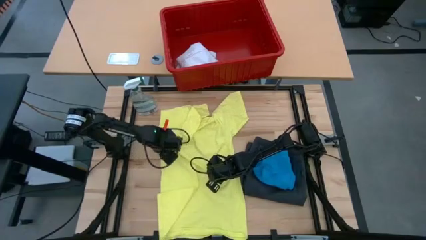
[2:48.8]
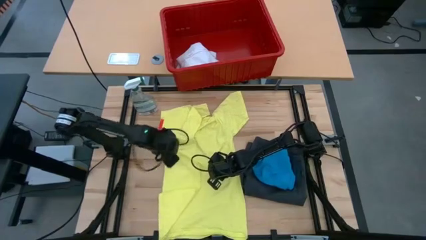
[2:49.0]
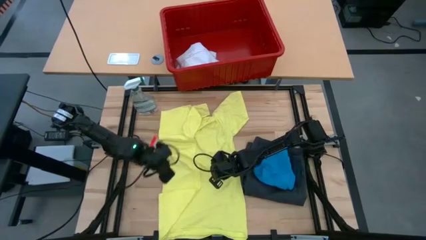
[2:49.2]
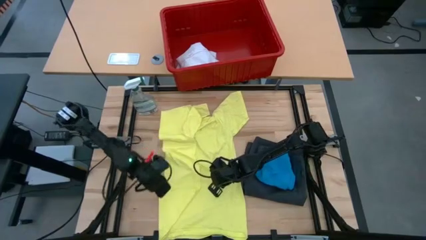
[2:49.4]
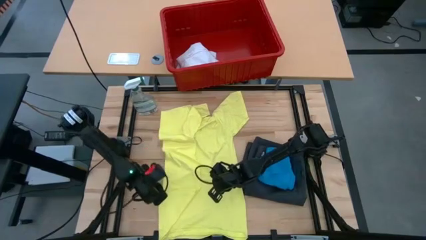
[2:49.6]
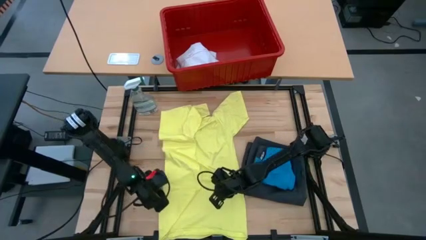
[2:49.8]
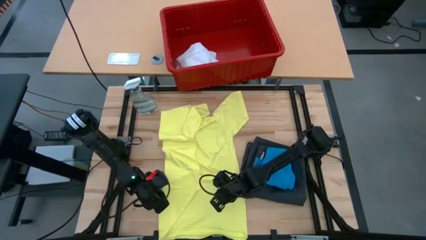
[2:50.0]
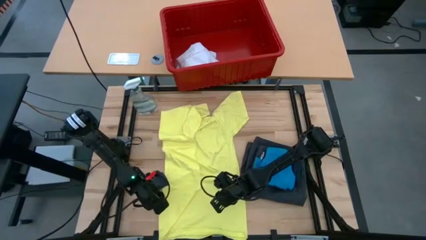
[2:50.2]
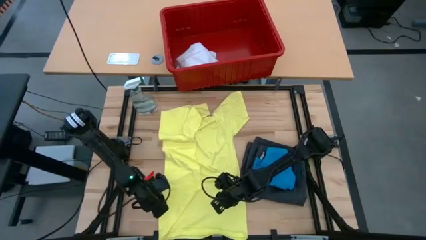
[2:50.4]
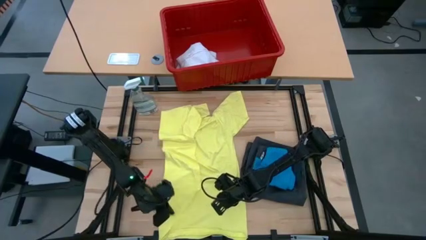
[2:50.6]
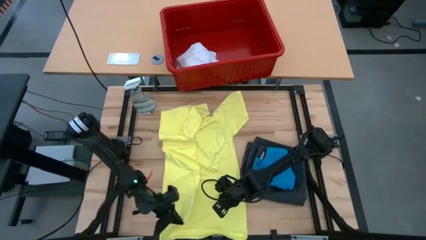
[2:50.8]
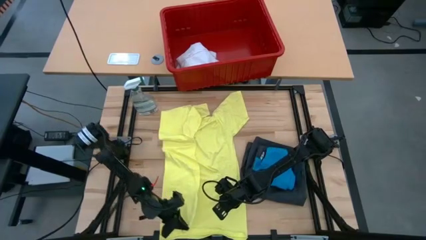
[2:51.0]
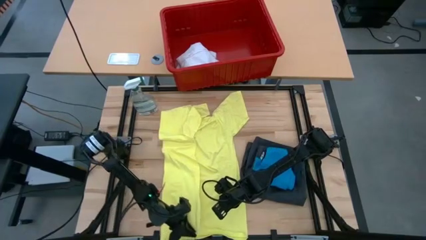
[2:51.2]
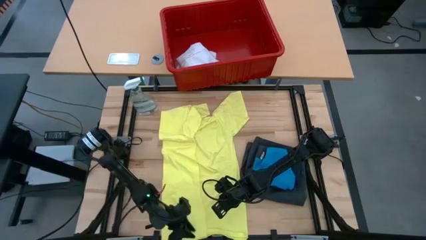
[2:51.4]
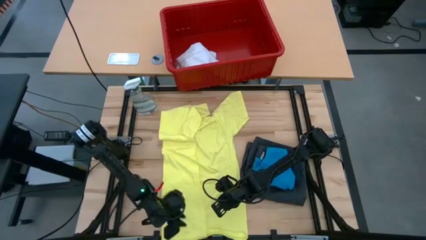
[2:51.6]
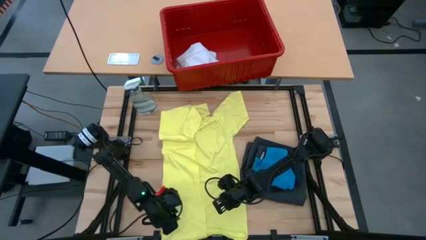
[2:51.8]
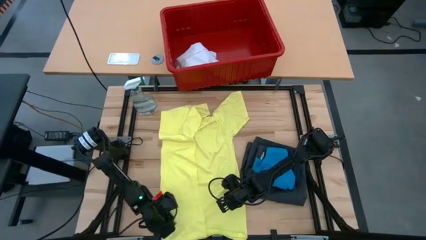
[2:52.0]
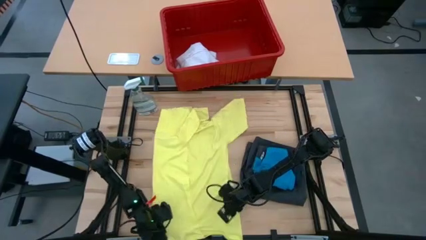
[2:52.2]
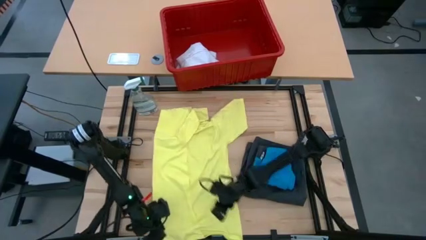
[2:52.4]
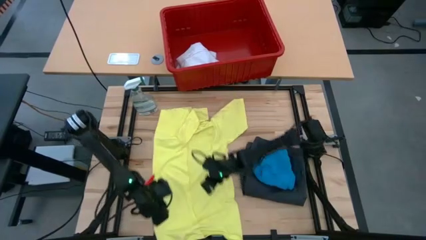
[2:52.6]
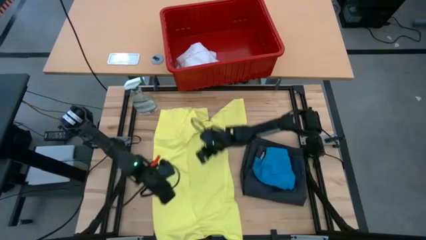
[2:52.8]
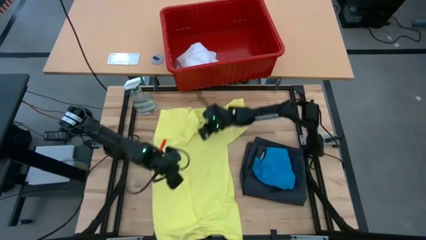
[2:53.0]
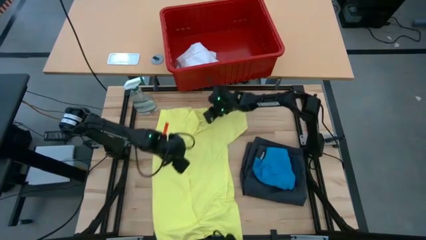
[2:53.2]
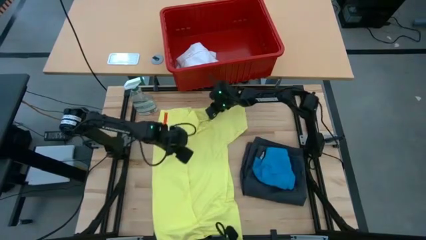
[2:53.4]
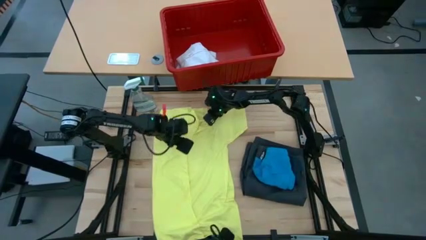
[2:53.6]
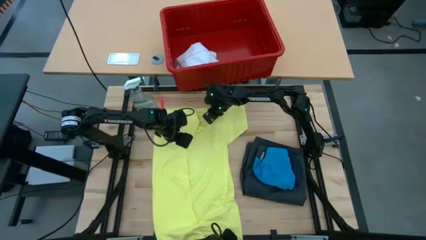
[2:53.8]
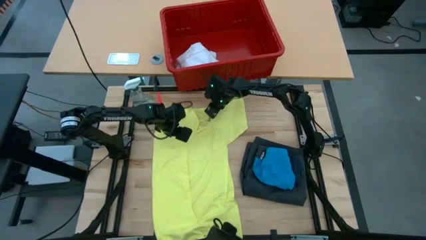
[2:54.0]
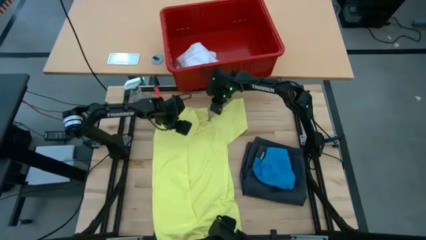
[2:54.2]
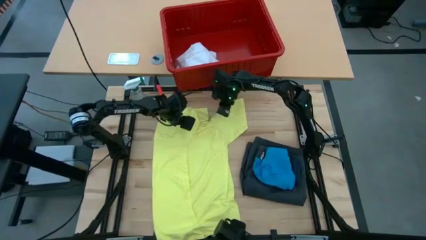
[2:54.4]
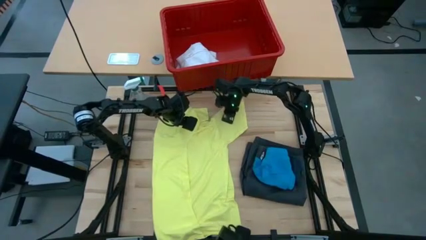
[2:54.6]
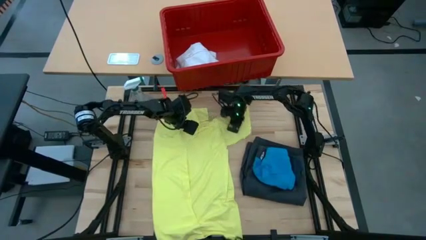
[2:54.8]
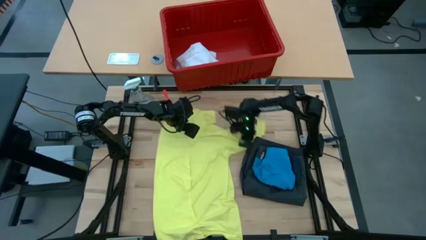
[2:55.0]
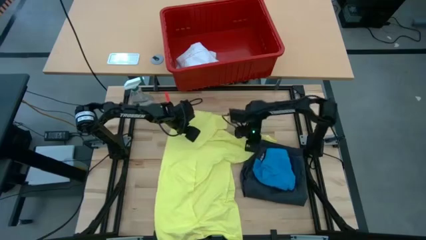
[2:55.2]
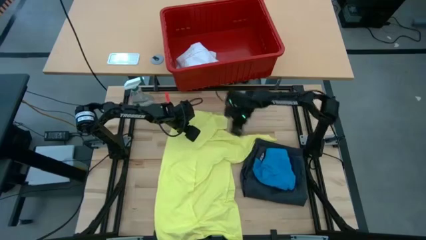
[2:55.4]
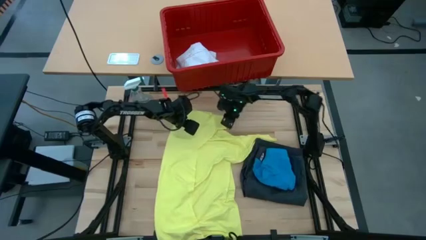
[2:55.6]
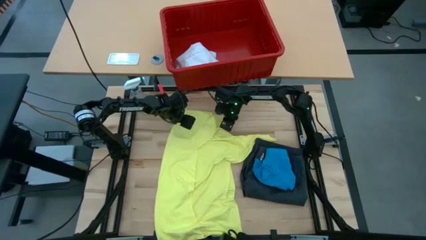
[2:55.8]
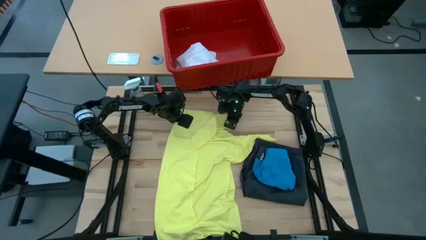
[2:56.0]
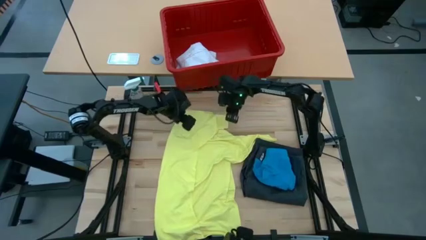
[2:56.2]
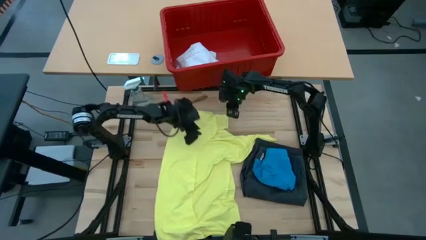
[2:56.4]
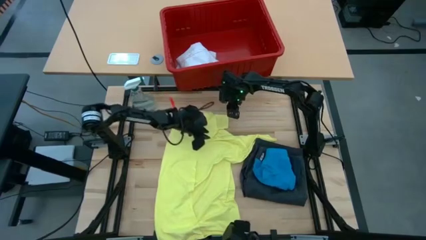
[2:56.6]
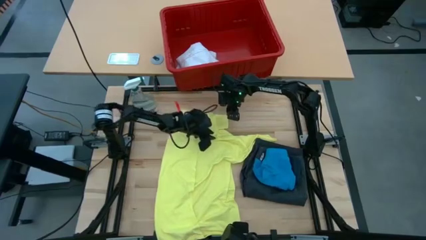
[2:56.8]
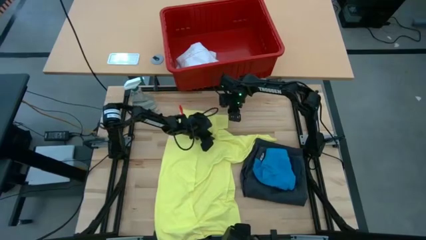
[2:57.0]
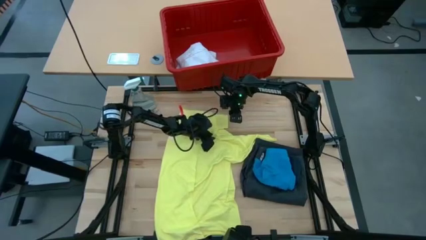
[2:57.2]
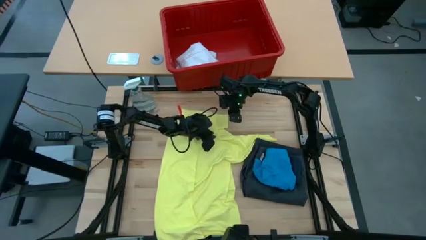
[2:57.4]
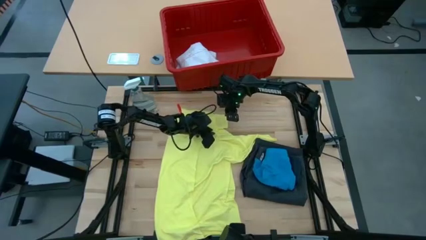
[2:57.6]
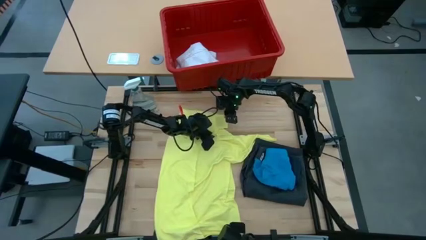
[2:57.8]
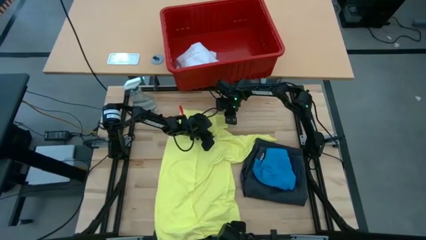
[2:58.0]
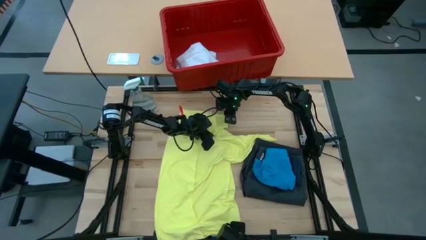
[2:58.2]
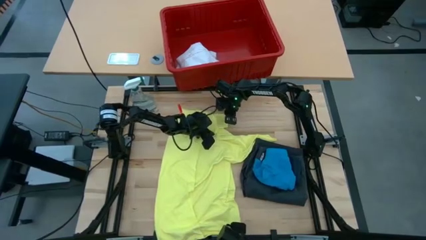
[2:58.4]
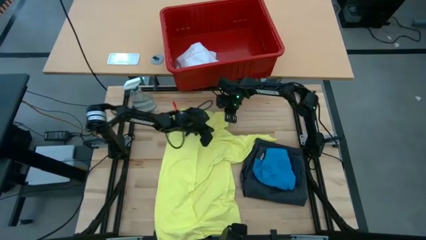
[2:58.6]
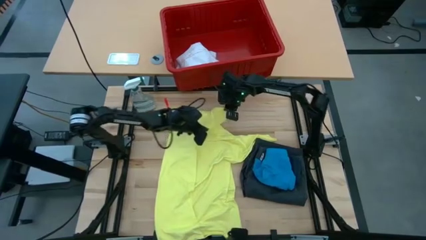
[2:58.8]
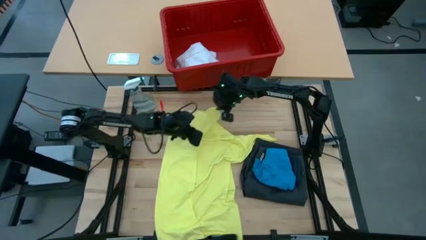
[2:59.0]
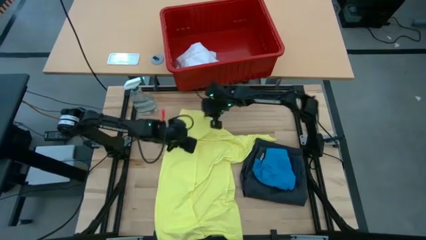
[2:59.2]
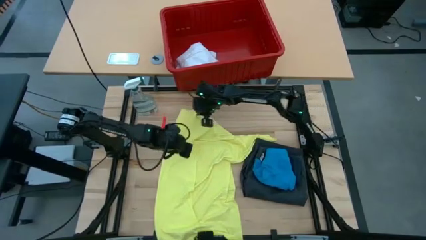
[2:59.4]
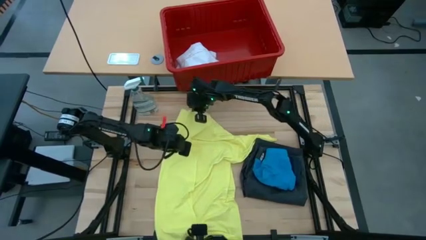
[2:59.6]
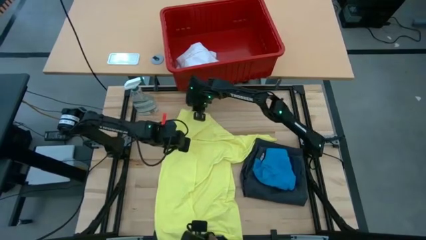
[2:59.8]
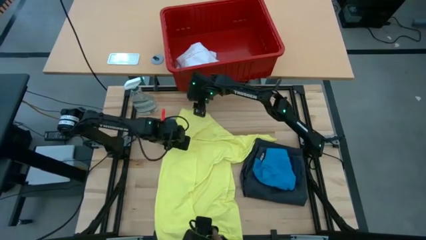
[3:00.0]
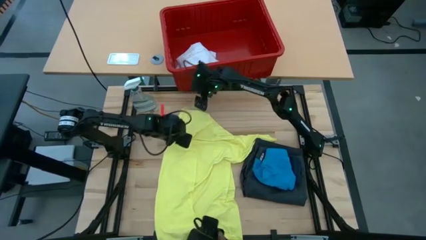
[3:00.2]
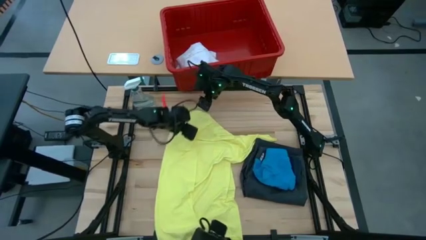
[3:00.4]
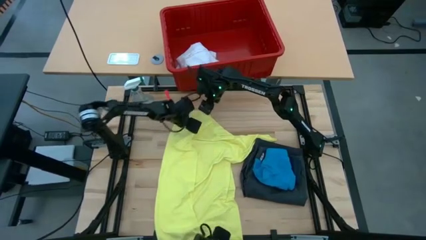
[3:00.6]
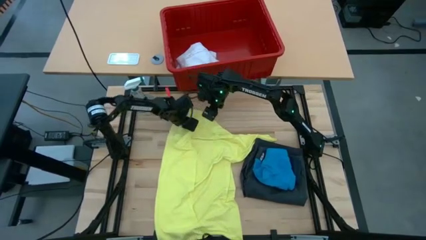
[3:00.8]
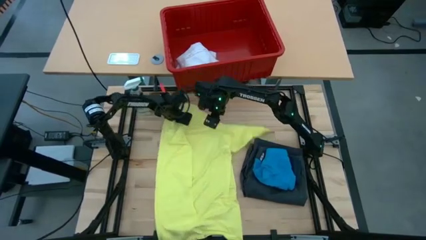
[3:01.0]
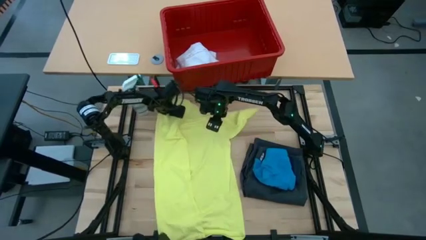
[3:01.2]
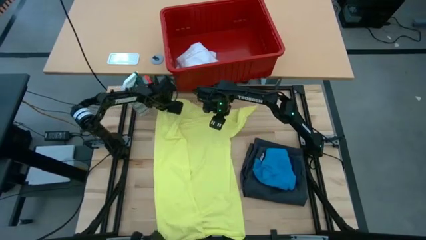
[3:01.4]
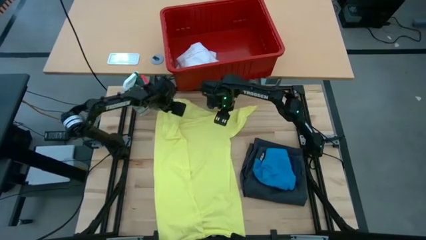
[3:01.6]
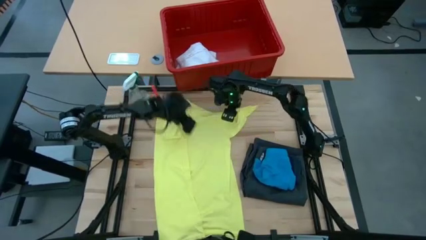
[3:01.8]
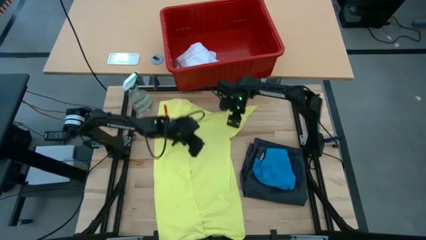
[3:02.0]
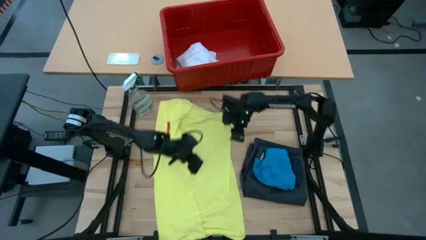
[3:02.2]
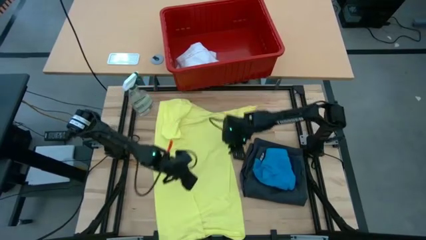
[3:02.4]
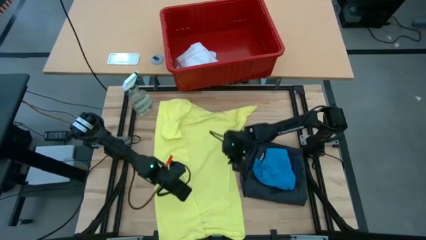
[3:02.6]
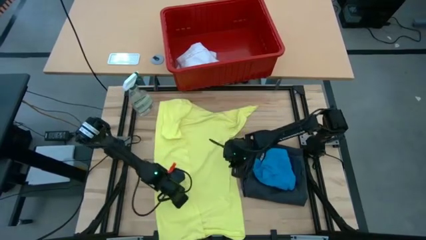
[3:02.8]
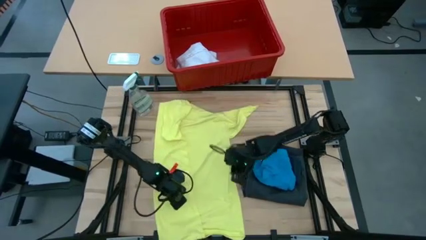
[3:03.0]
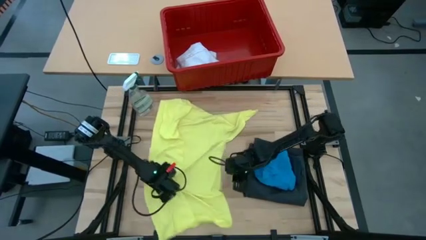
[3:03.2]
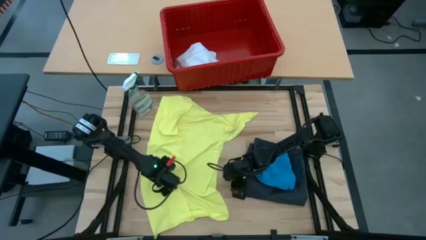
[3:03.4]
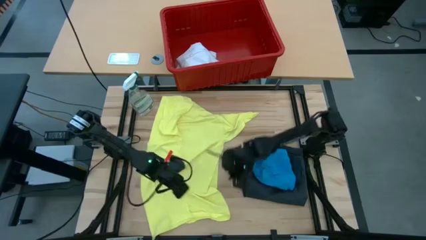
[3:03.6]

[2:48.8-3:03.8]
Task: Fold laundry
Fold the yellow shirt
